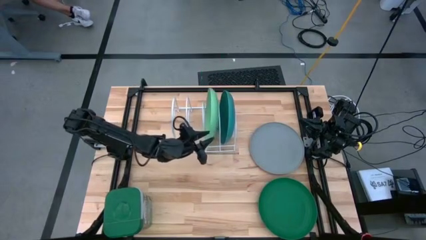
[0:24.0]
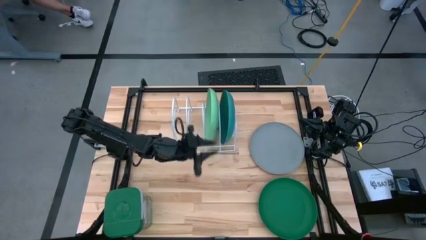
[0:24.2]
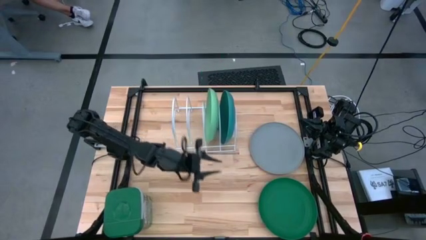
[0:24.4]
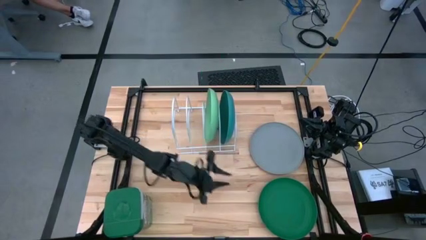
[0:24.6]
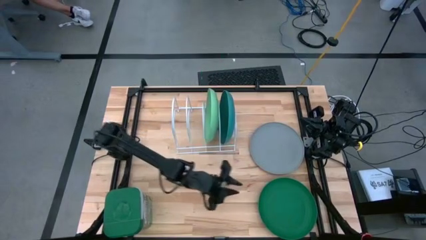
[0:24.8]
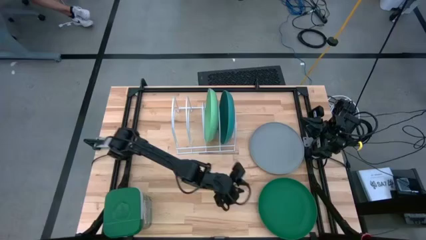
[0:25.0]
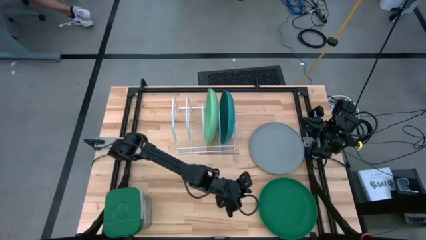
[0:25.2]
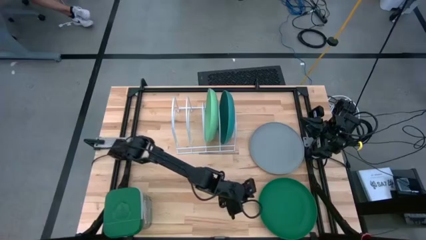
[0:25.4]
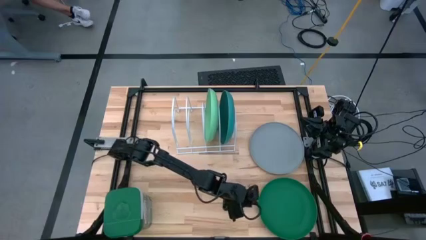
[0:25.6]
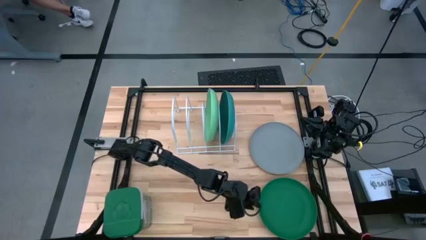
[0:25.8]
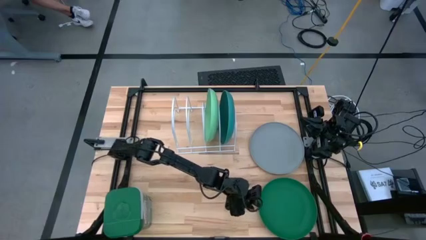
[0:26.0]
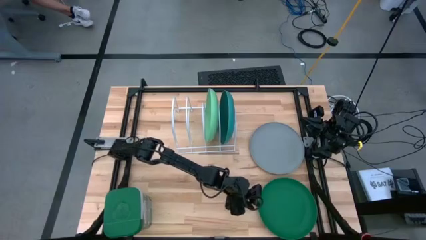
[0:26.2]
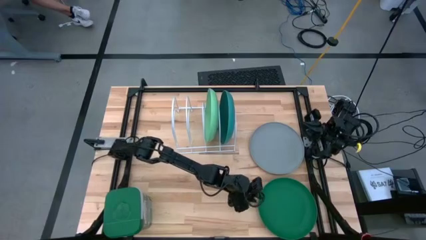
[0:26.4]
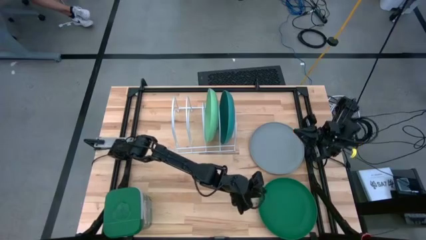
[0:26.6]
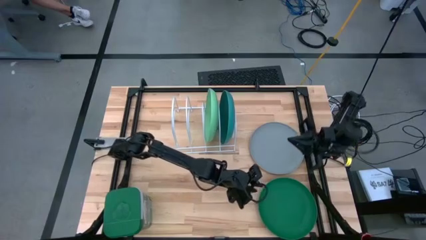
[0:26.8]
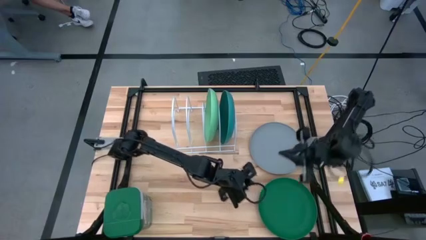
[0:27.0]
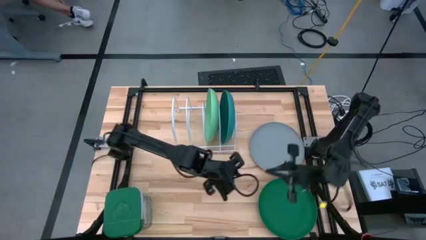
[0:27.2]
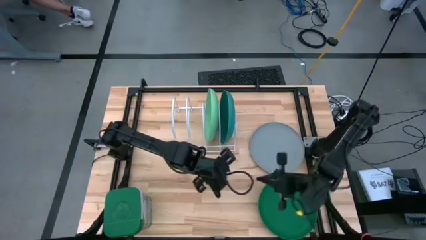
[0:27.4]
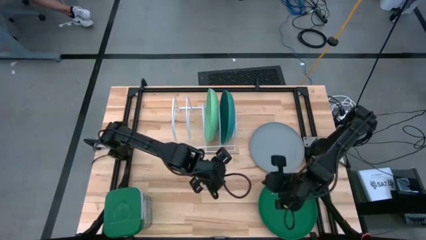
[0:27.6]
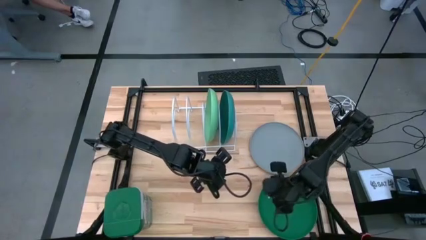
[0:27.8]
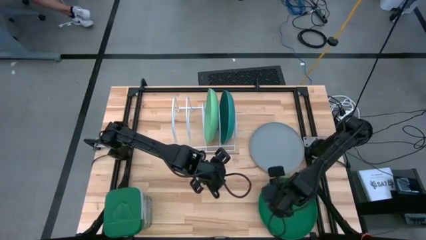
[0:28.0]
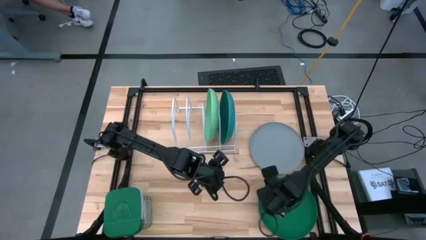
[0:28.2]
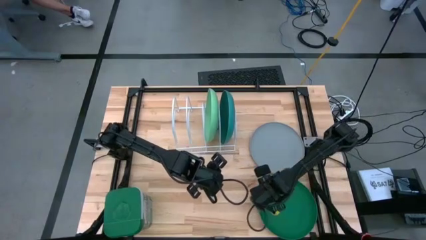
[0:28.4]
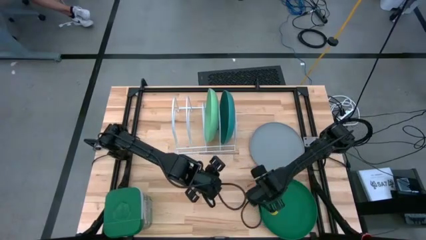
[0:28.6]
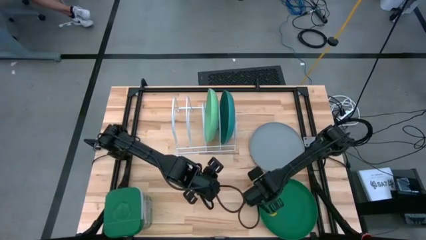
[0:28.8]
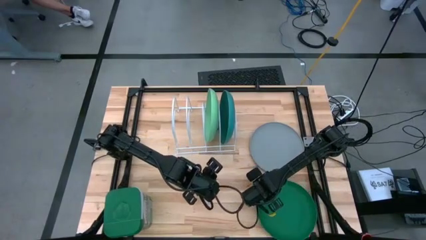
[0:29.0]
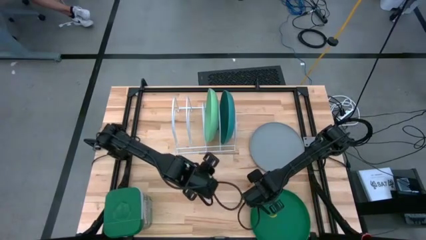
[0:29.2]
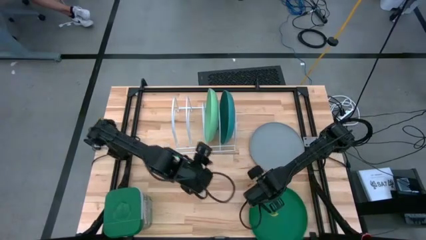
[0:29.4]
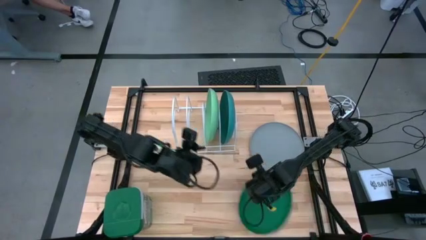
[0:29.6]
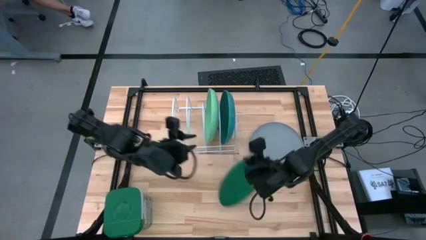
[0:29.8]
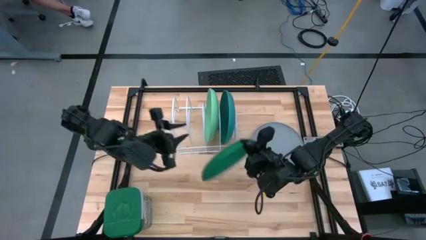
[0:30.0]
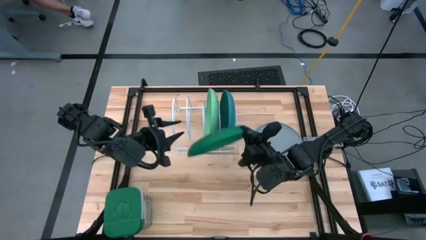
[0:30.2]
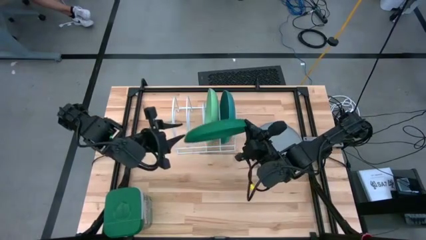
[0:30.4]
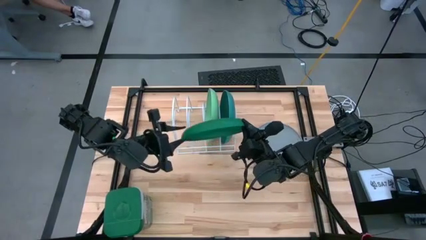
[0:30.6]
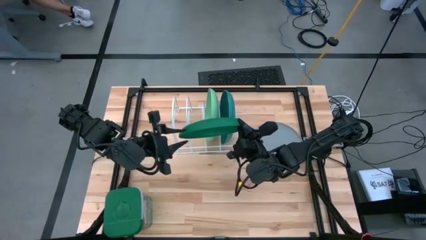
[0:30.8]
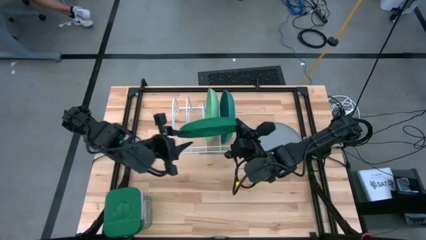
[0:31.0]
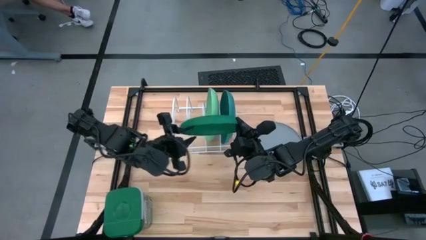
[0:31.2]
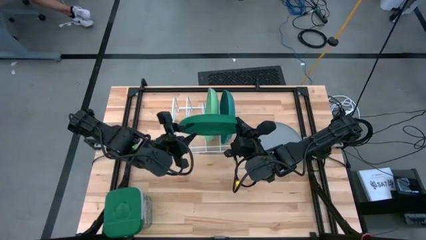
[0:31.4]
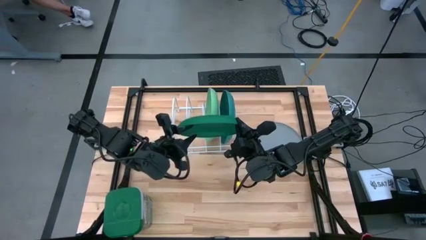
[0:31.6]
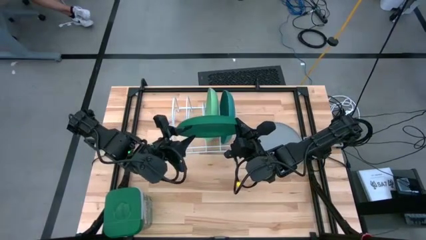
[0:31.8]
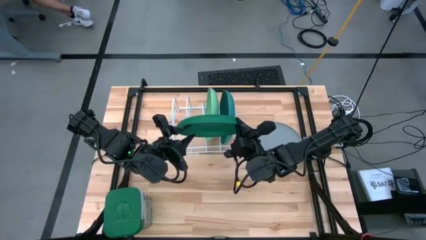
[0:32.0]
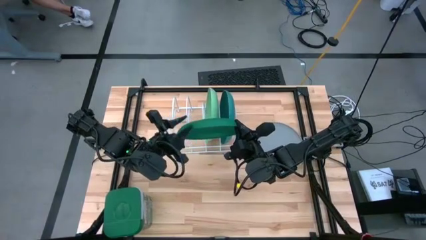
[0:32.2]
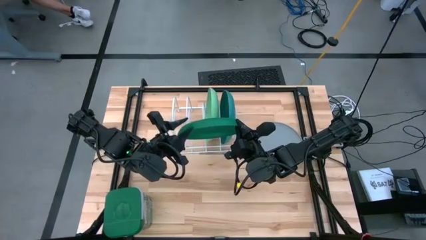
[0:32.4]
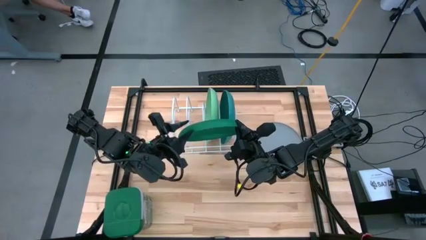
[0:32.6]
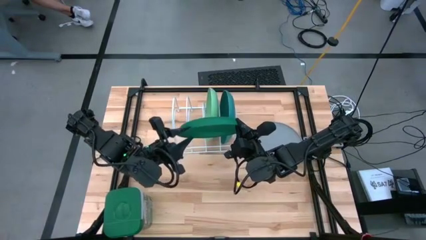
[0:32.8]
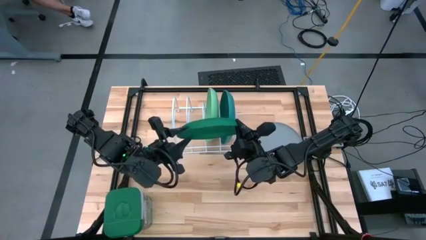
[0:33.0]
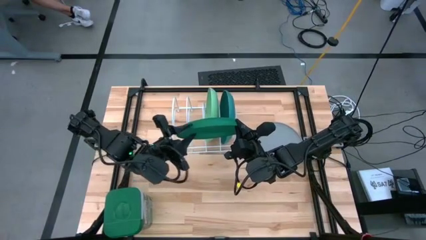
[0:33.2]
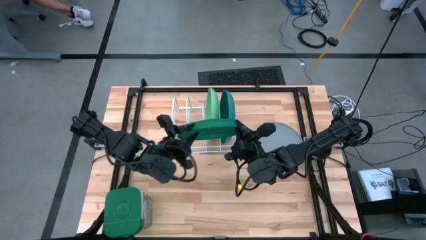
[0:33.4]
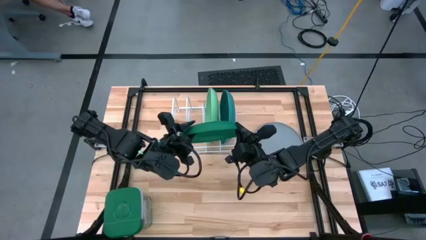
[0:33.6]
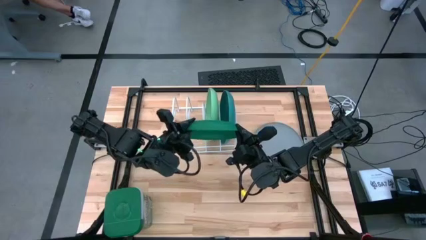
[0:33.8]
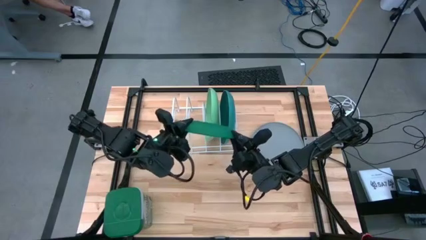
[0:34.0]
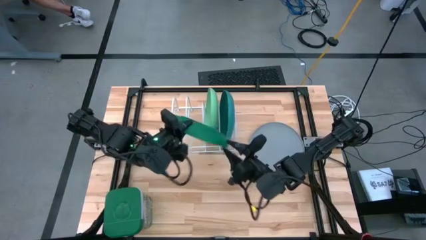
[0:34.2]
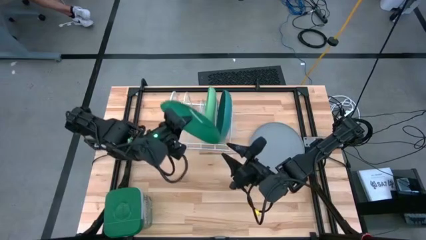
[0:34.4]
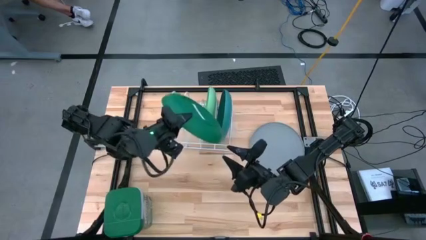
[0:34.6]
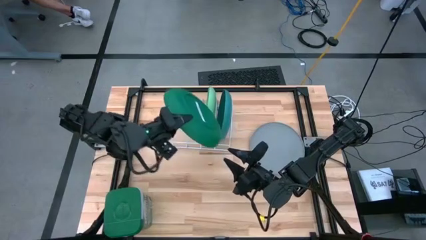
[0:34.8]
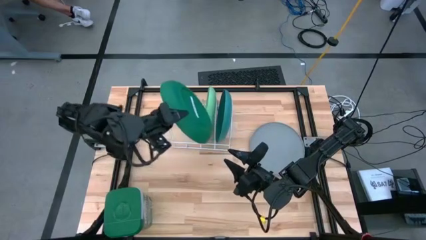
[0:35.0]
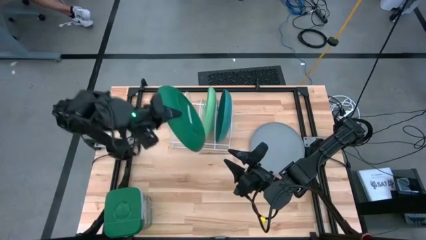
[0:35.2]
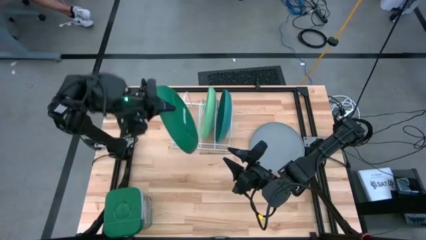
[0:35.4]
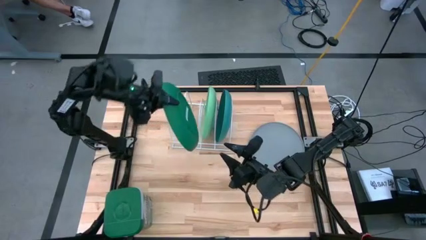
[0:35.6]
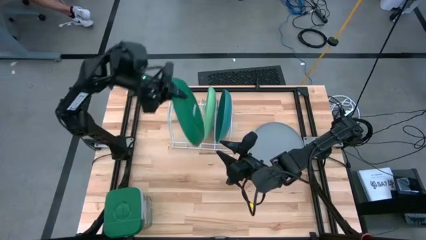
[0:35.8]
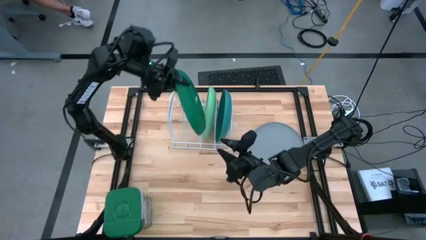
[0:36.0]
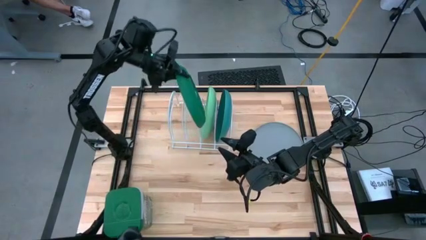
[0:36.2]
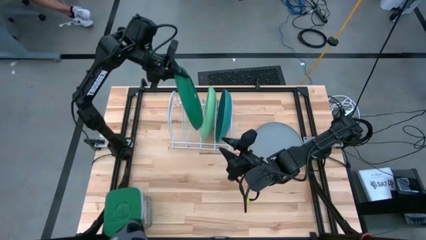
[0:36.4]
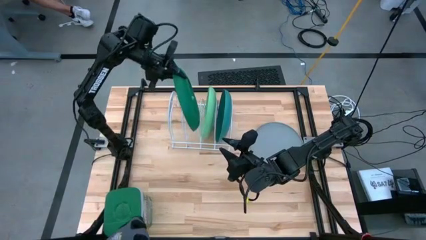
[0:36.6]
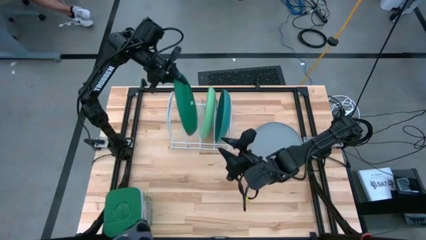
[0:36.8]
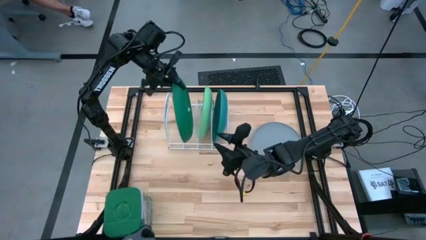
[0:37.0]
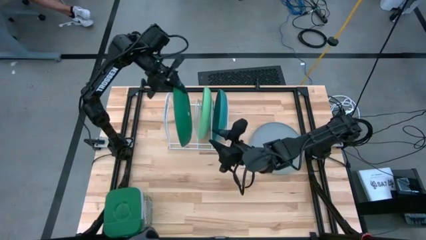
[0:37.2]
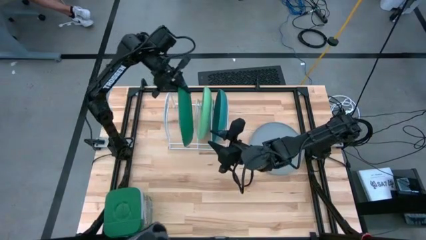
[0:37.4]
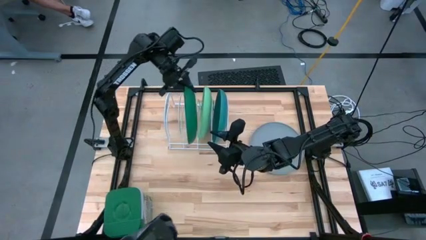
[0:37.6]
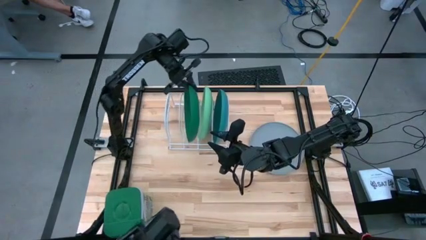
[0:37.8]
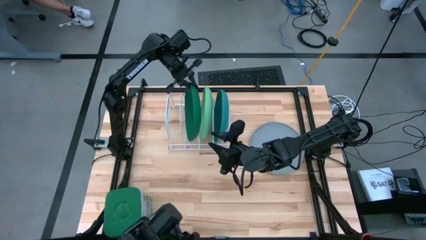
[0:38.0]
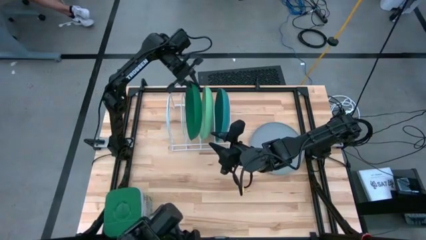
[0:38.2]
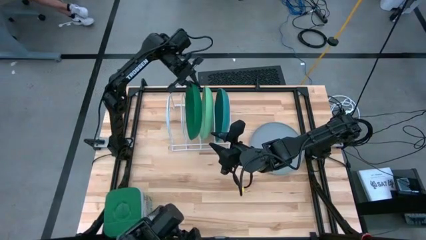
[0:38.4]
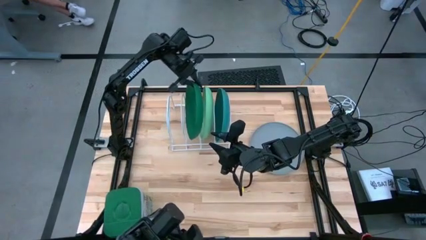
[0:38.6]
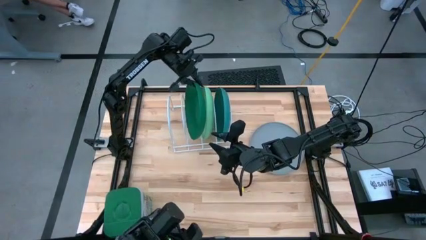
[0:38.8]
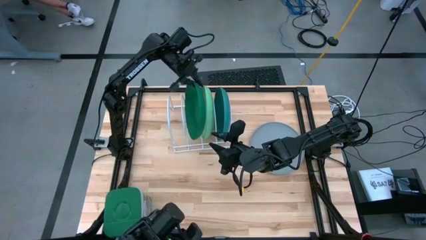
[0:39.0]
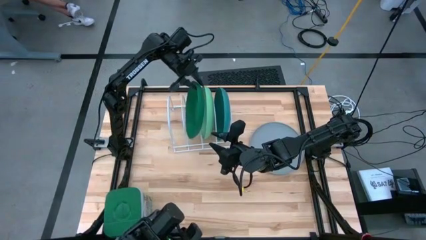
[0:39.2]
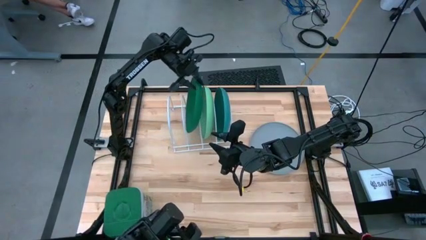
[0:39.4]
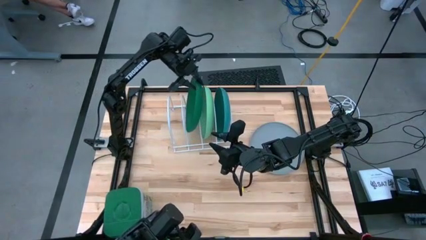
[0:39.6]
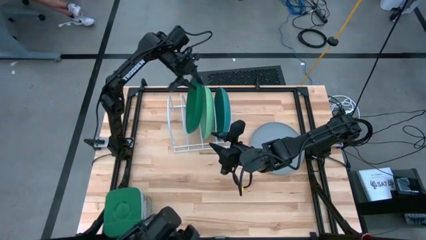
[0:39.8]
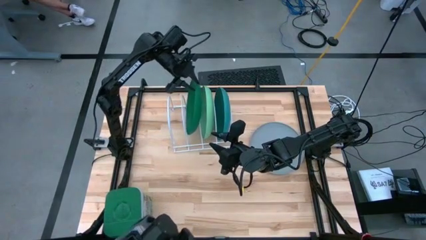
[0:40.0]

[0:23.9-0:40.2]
Task: Sort dishes
Put the dark green plate into the dish rack
